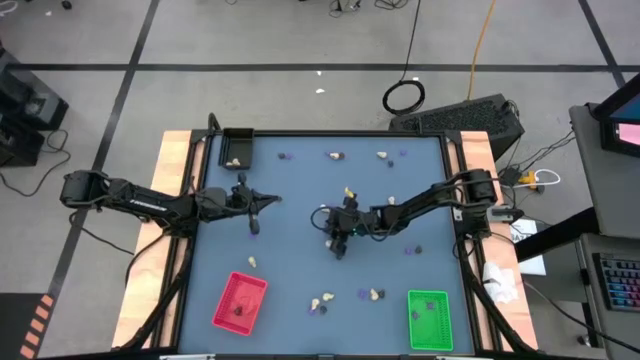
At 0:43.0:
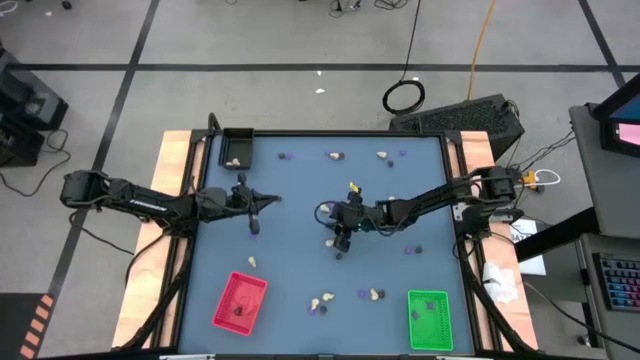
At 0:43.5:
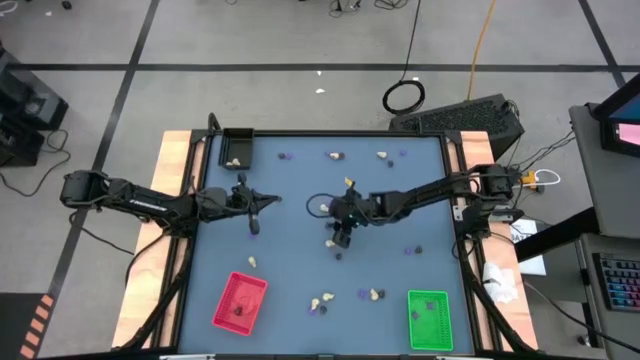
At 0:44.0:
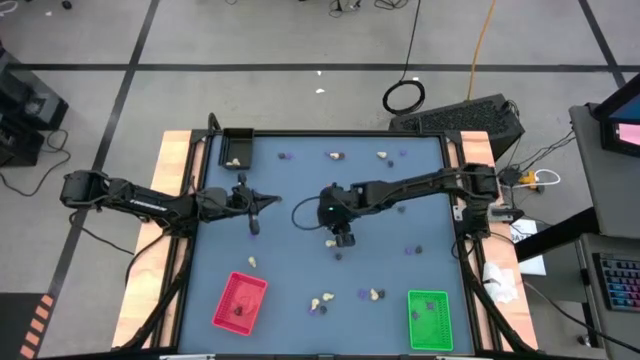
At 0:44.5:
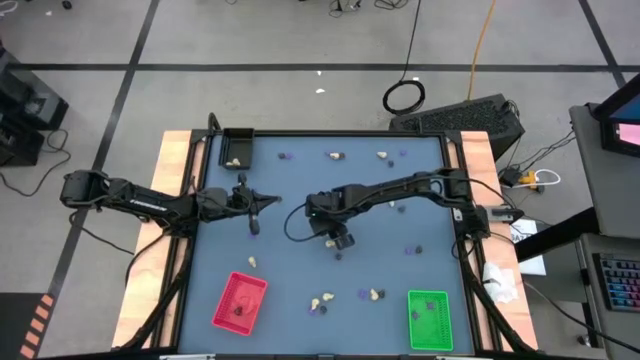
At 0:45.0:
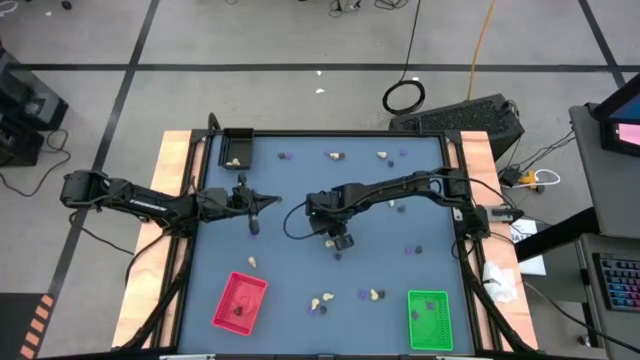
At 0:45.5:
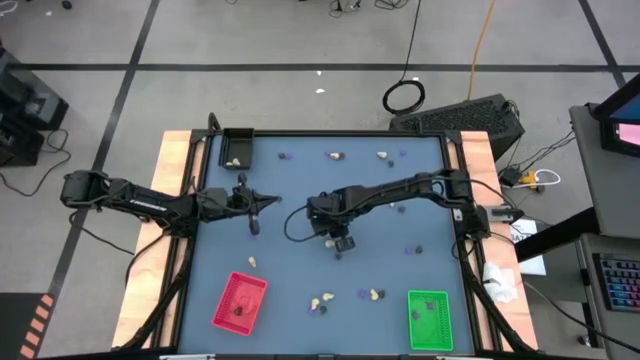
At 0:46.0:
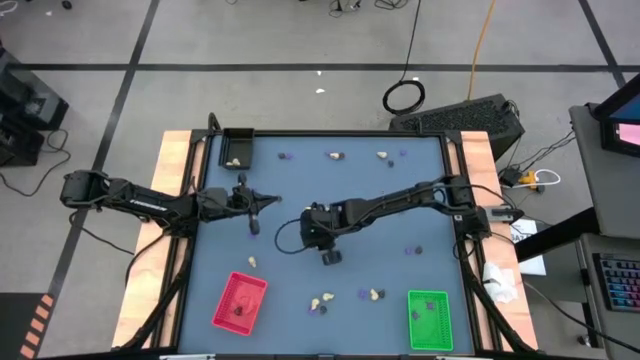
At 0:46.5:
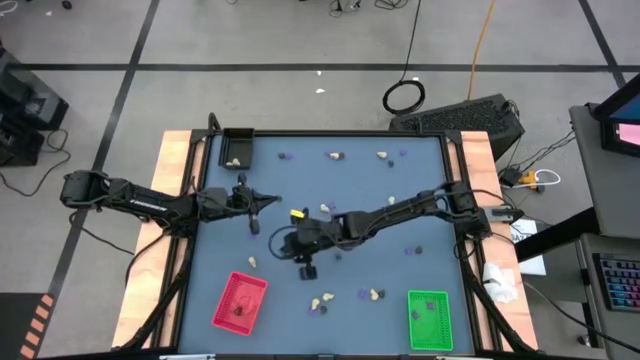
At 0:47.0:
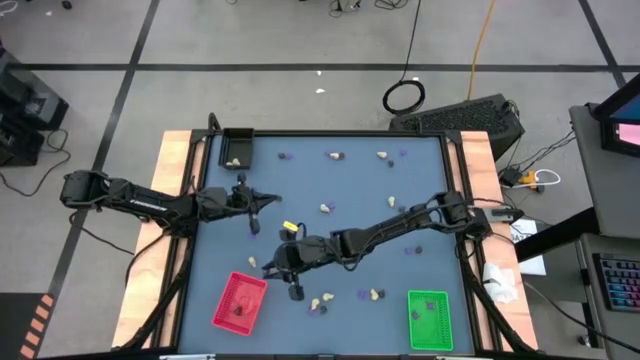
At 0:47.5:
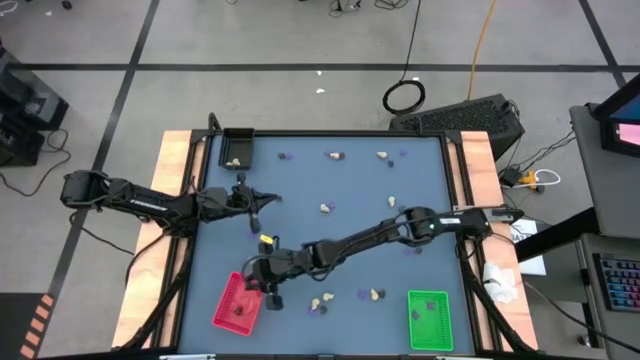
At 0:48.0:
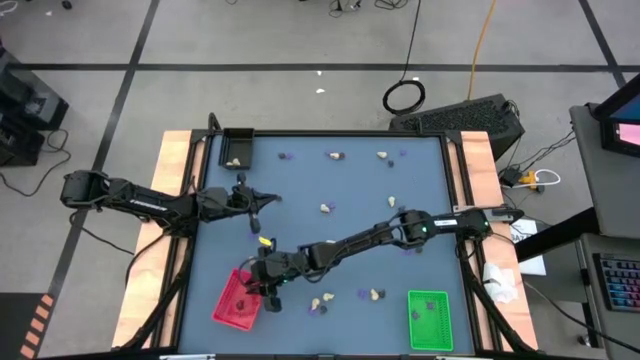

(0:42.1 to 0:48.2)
Task: Sort Halloween decoration
Put the black skull toy into the red bin

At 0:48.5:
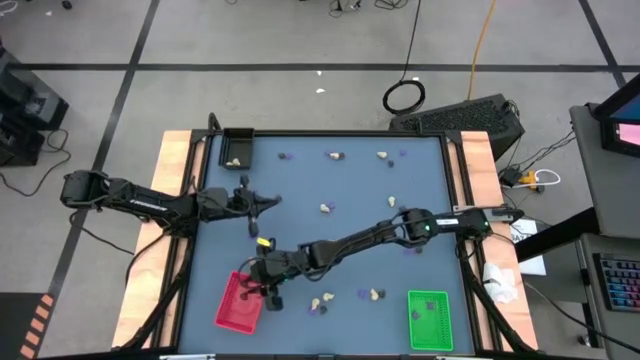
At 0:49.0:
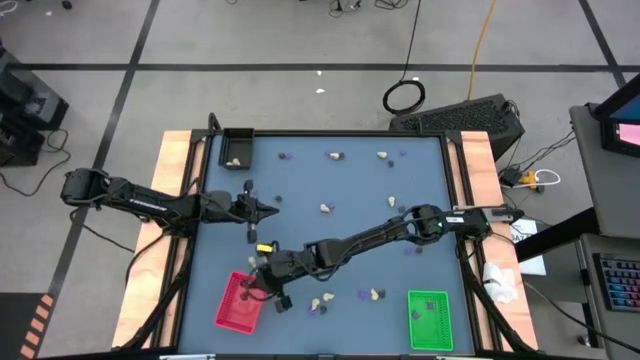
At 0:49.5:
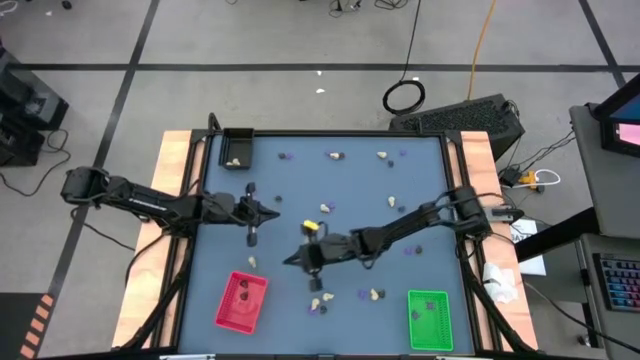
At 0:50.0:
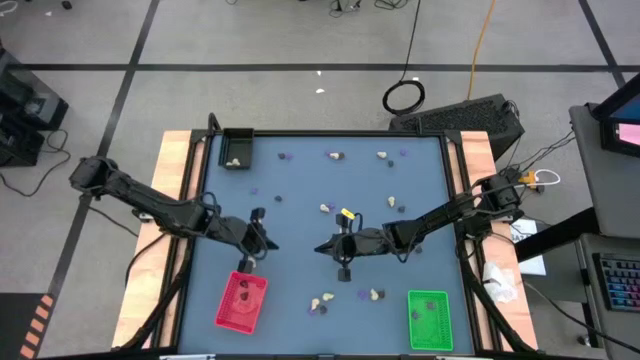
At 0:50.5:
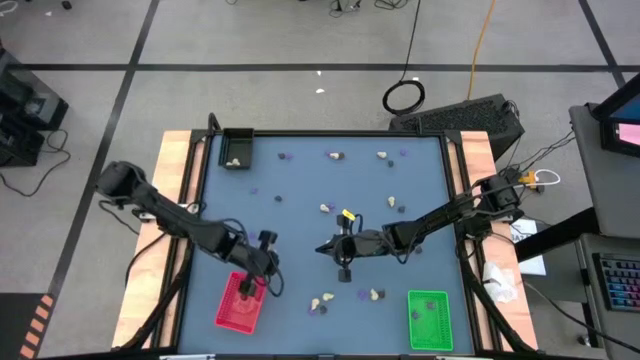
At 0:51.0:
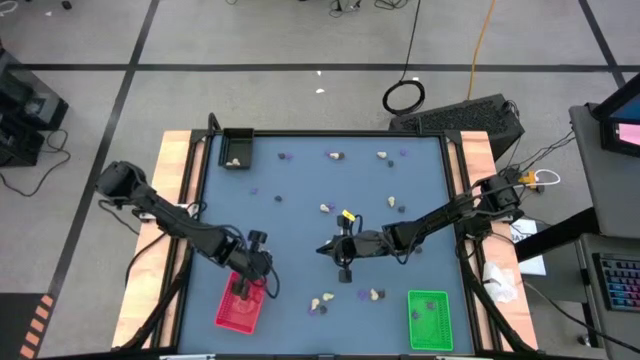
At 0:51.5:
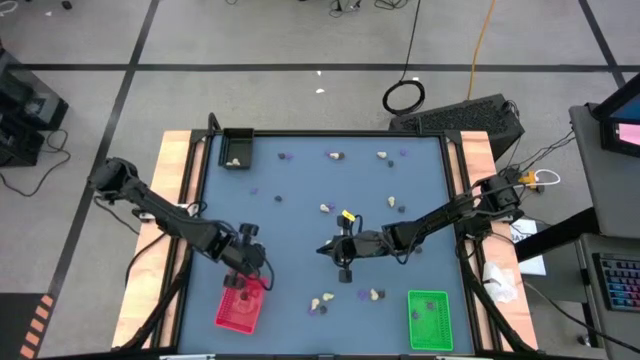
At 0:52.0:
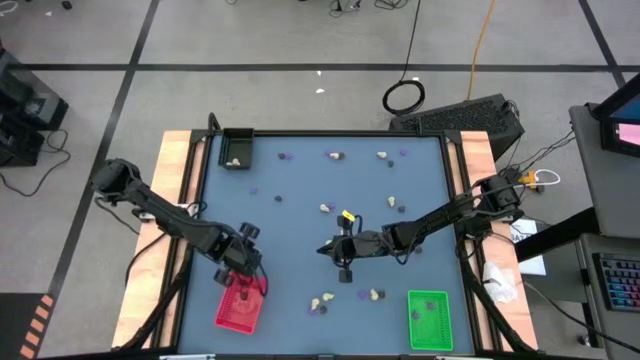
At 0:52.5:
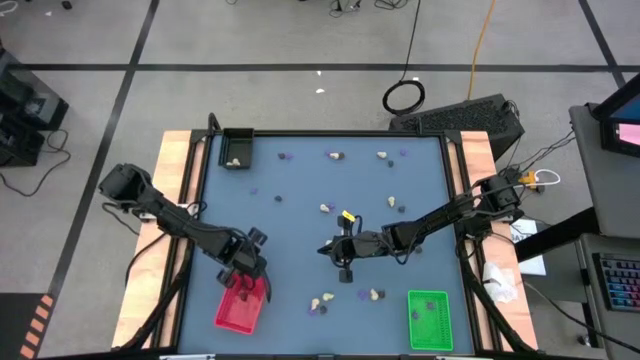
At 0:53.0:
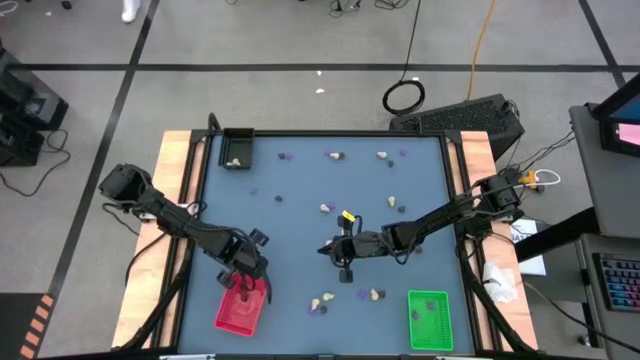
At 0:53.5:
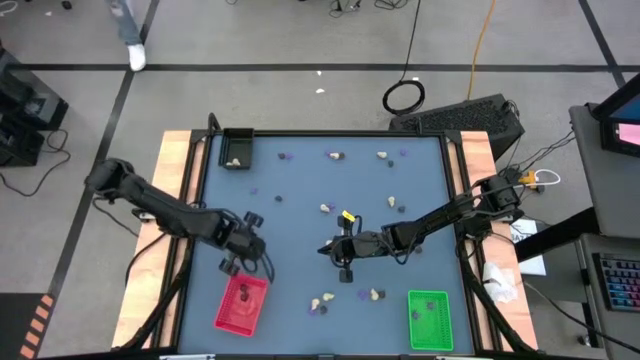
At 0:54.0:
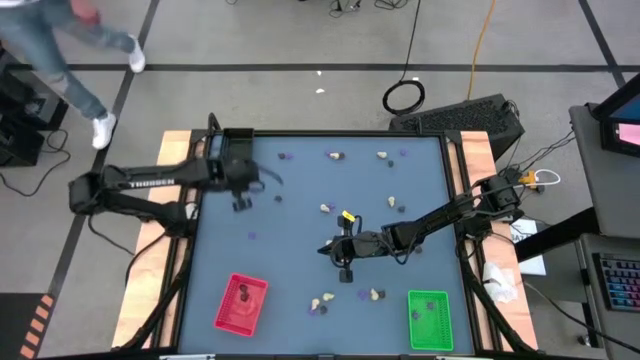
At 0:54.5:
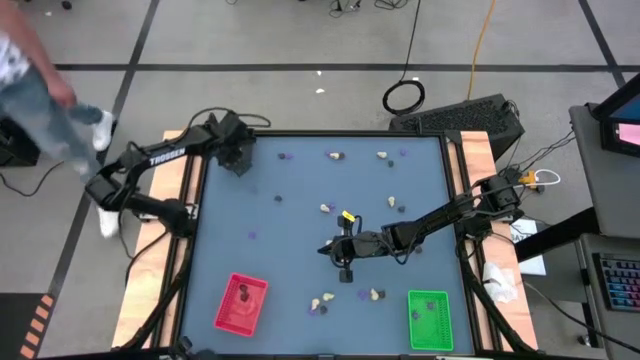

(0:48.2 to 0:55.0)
Put the white skull toy into the black bin

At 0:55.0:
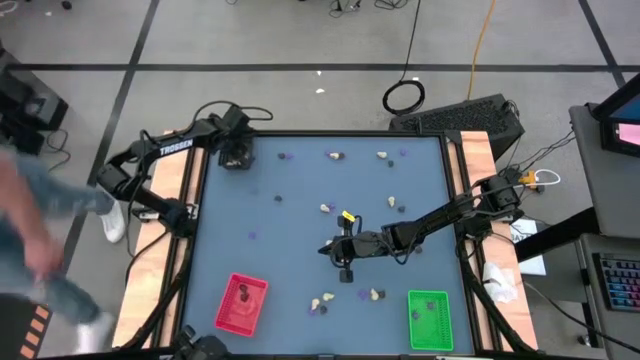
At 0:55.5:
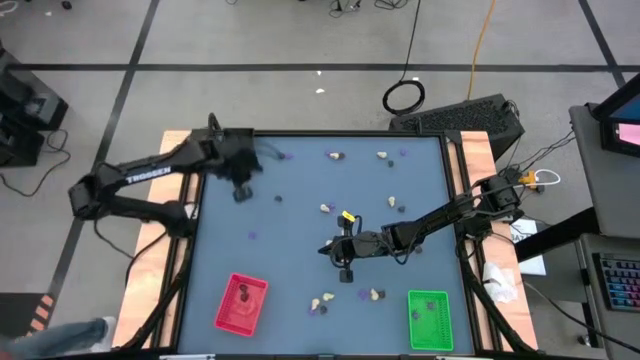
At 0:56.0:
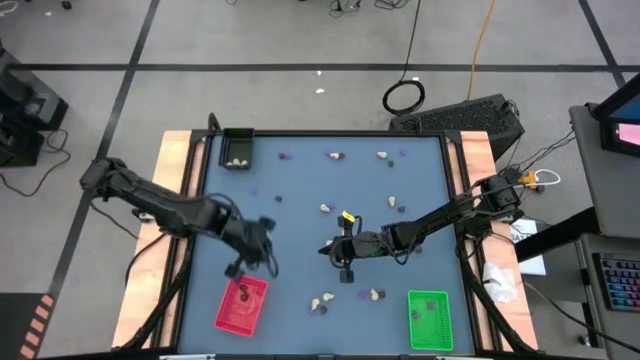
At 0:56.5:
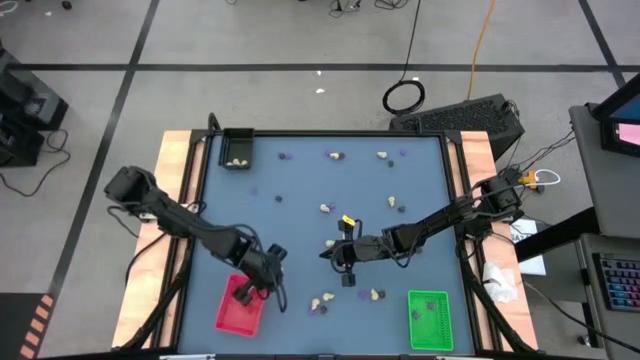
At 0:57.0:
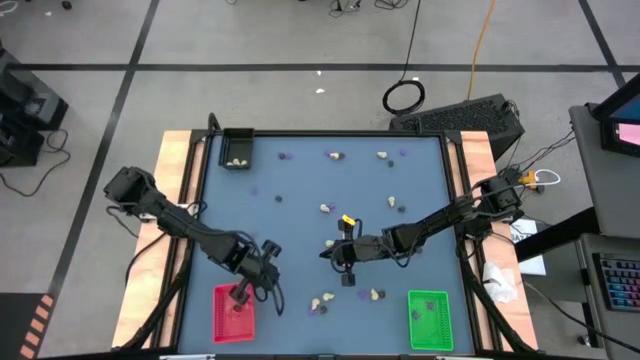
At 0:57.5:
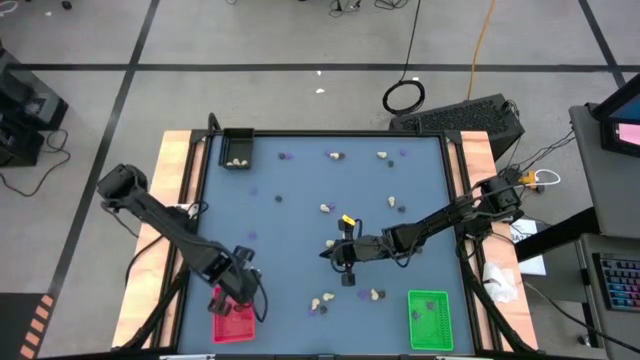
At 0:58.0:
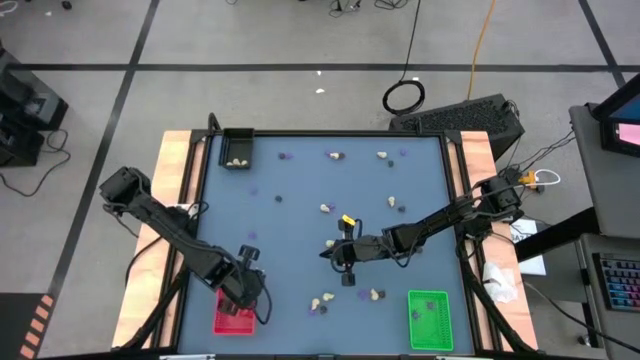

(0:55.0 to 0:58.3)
Adjust the red bin

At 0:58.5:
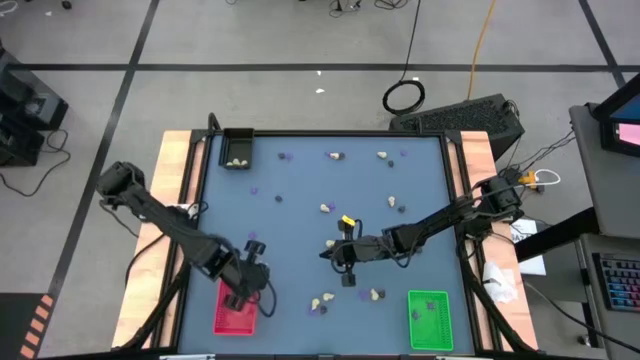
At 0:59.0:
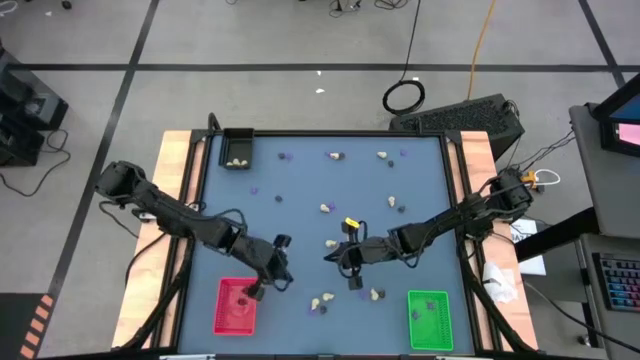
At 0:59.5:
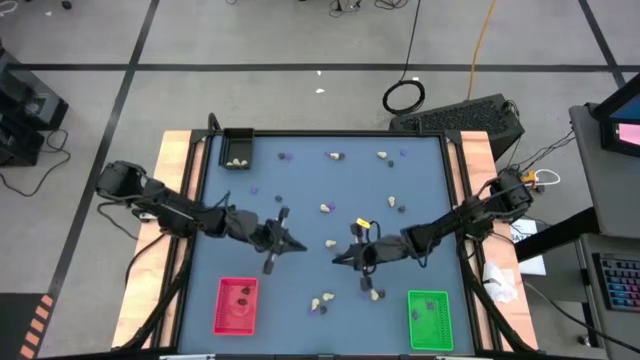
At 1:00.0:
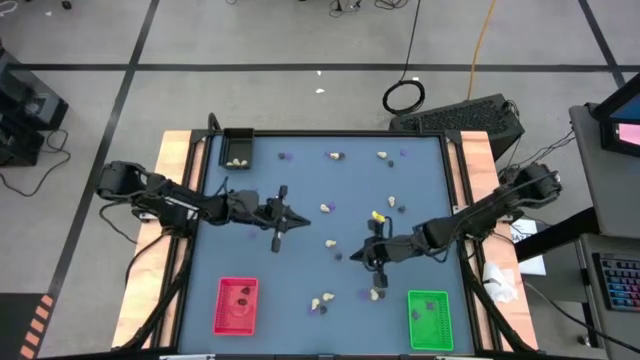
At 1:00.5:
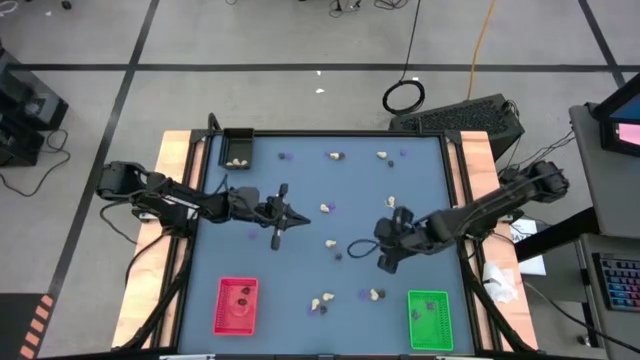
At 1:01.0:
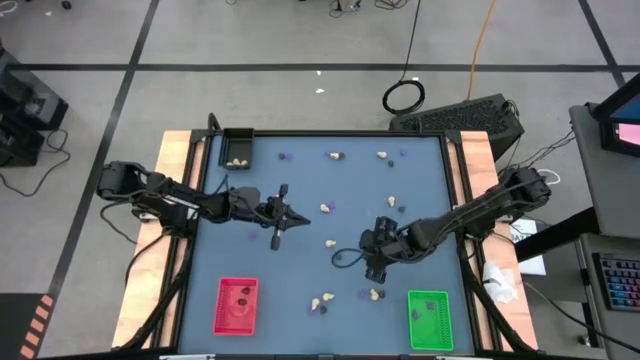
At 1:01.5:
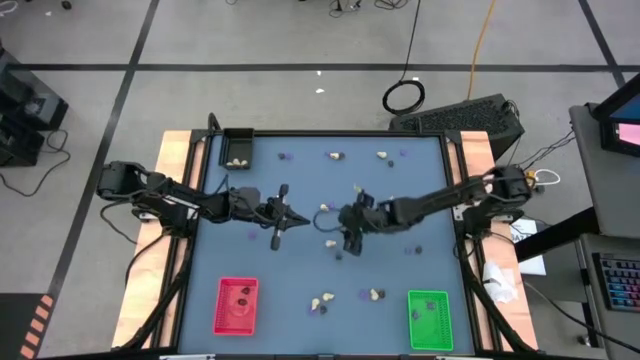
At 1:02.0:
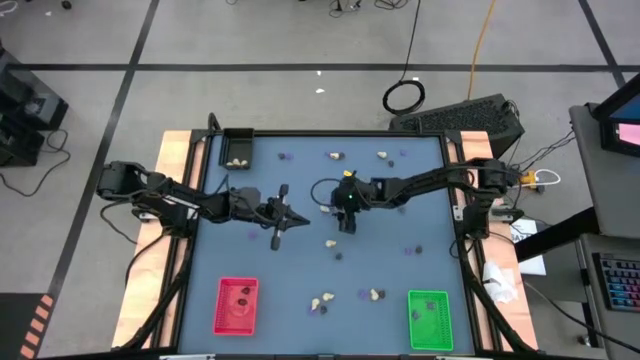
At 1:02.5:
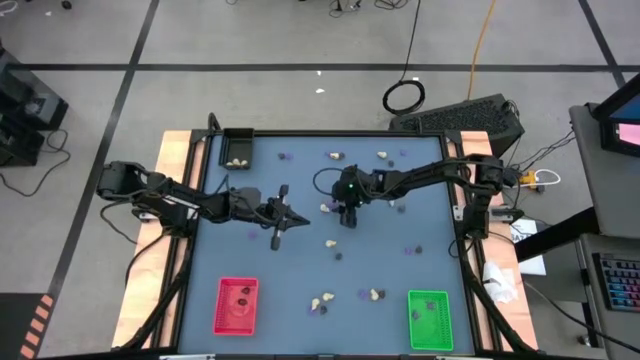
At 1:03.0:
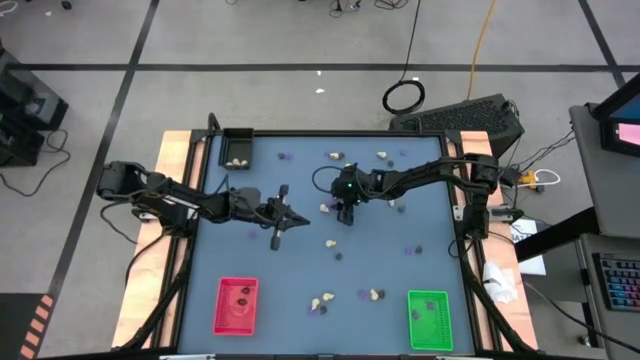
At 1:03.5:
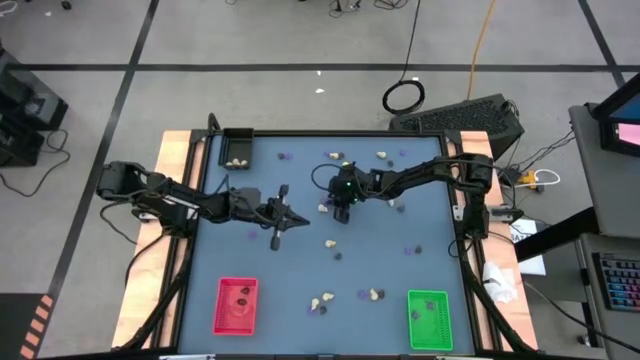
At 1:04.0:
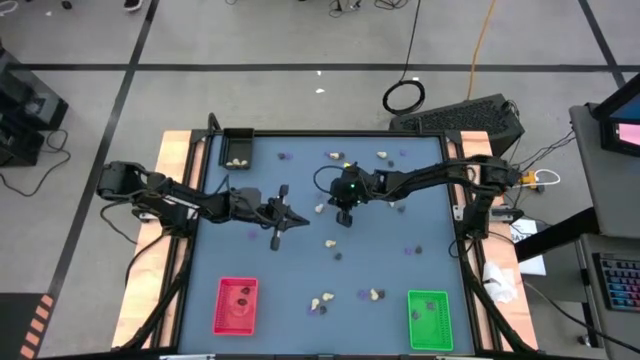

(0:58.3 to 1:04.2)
Put the violet spider toy into the green bin
